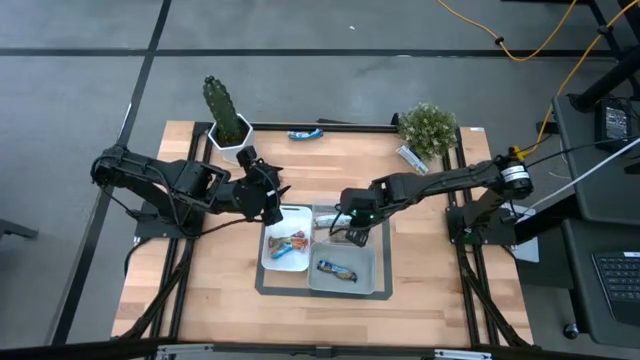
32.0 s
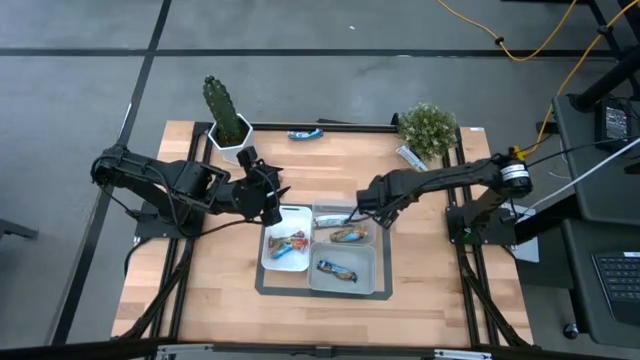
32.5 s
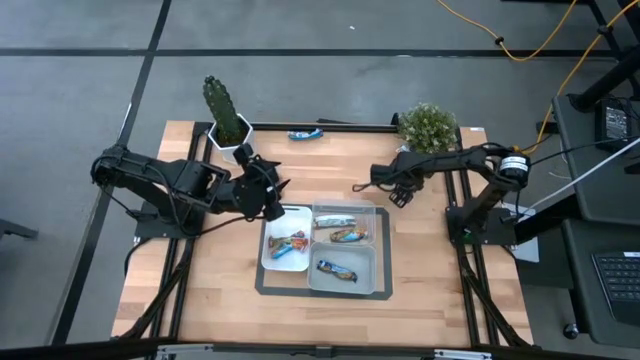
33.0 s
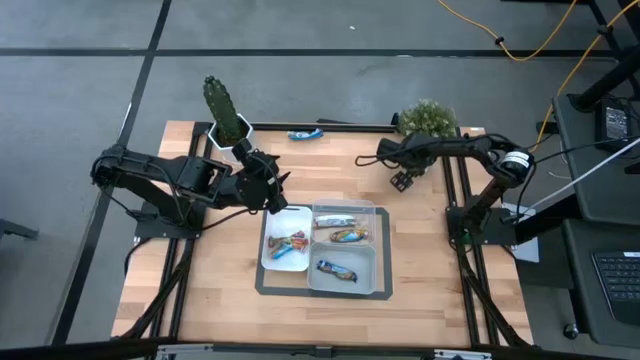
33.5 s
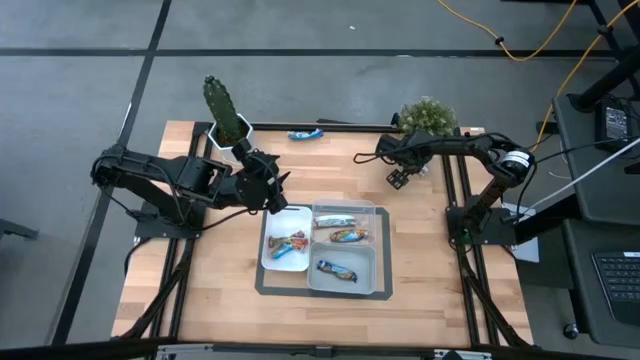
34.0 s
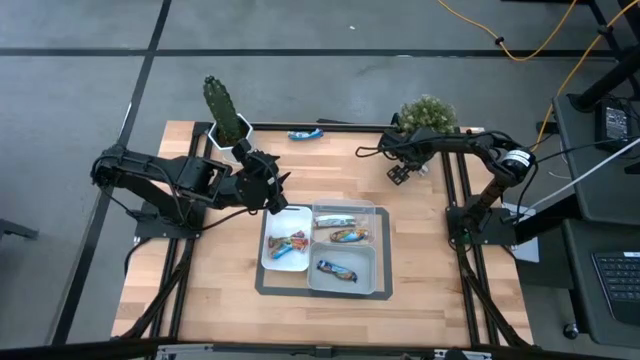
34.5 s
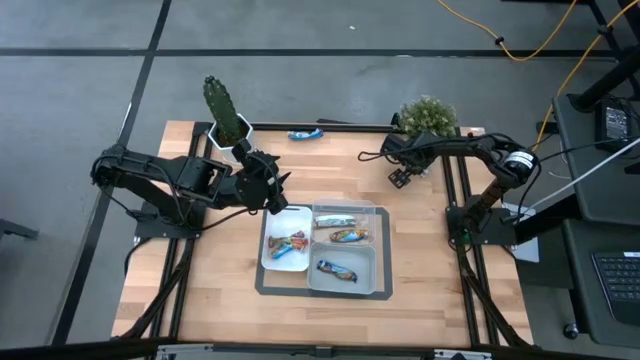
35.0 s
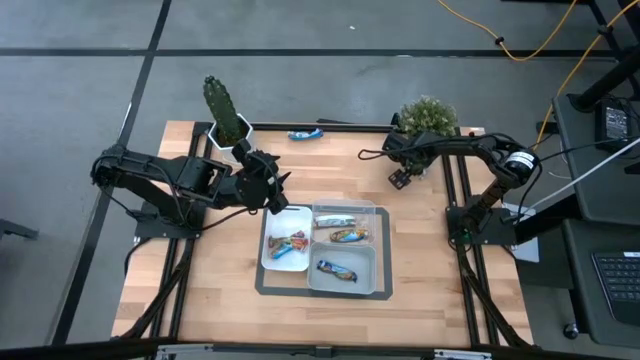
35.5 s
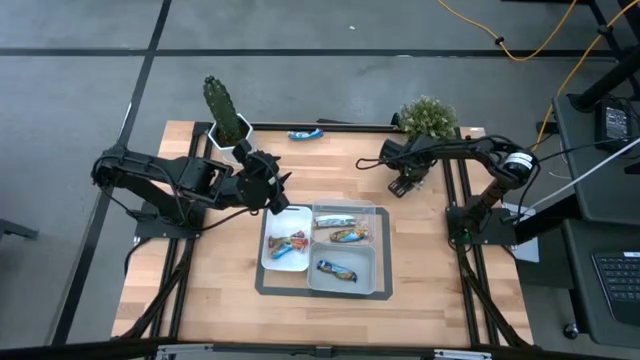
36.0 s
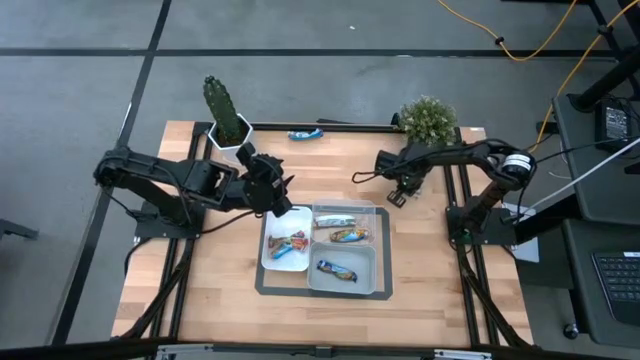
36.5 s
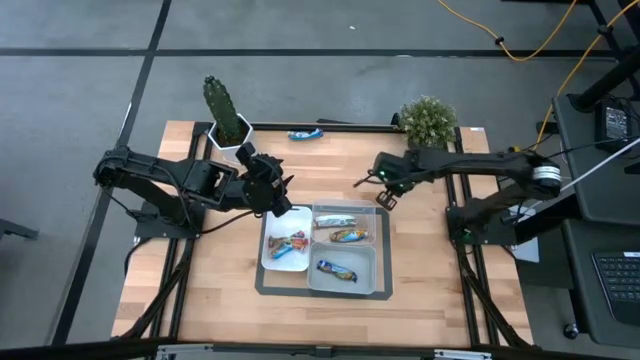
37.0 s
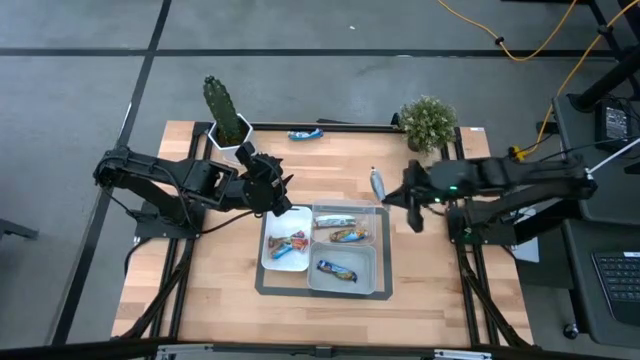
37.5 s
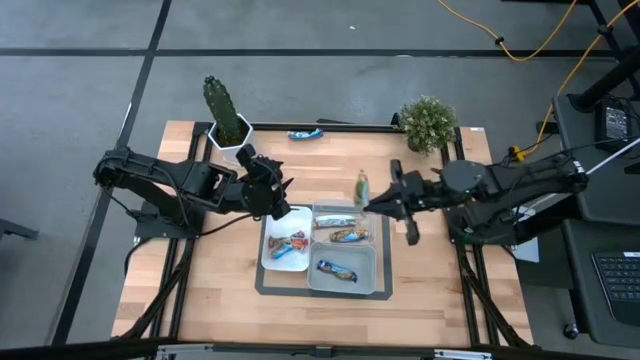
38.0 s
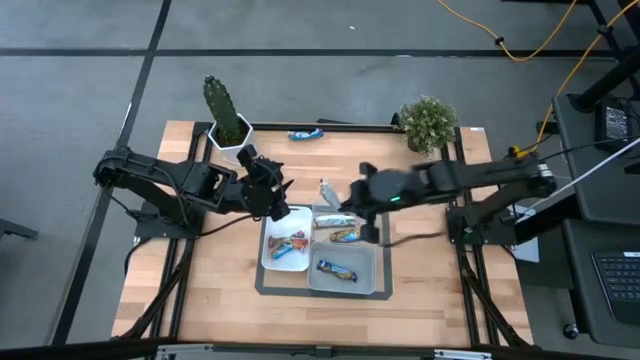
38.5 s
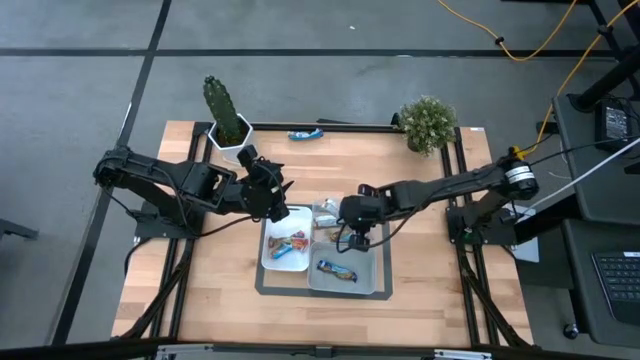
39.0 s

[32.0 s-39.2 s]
Task: Pick and place Granola Bars by type
Put the yellow granola bar into the transparent bin

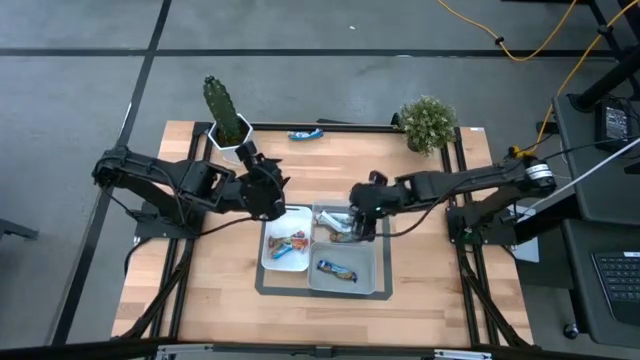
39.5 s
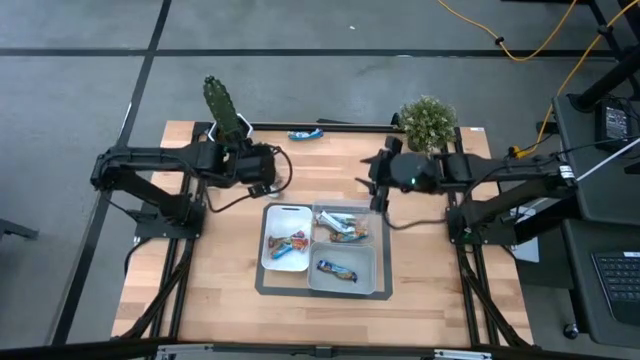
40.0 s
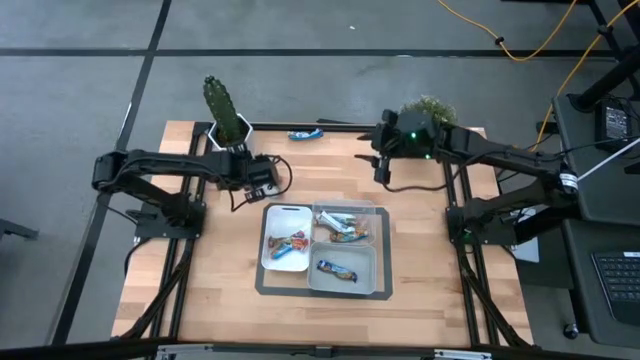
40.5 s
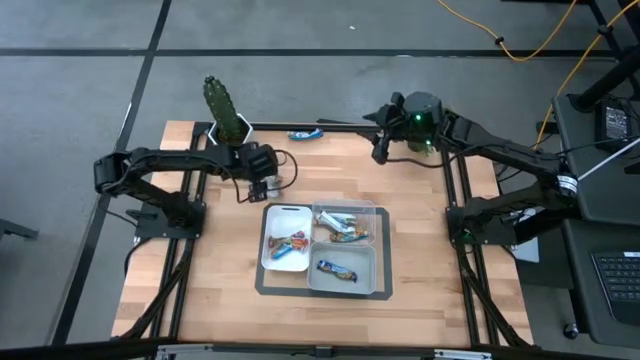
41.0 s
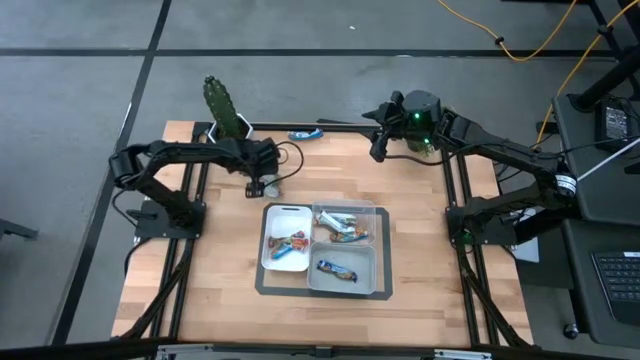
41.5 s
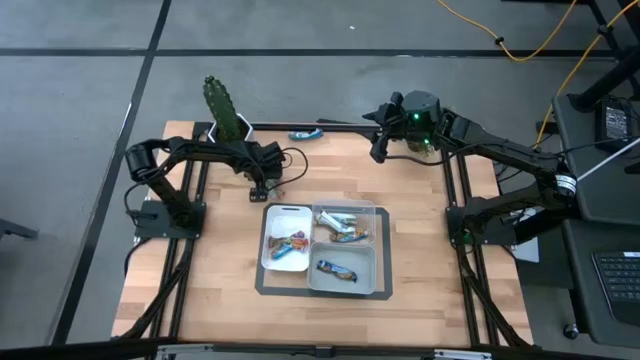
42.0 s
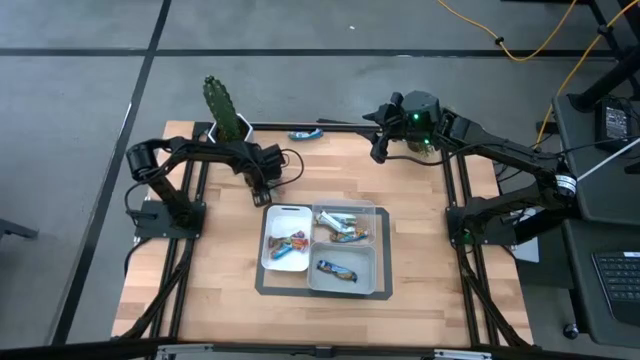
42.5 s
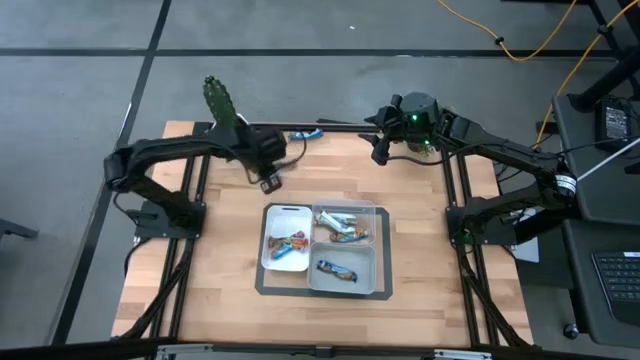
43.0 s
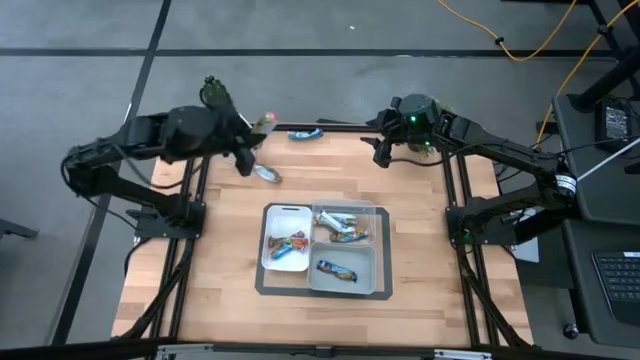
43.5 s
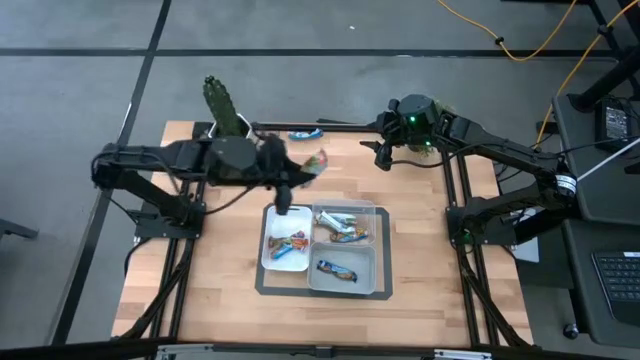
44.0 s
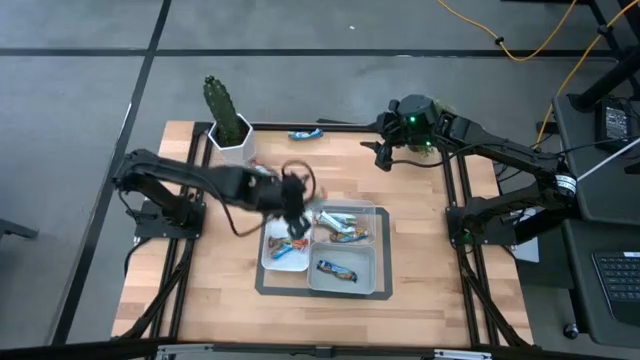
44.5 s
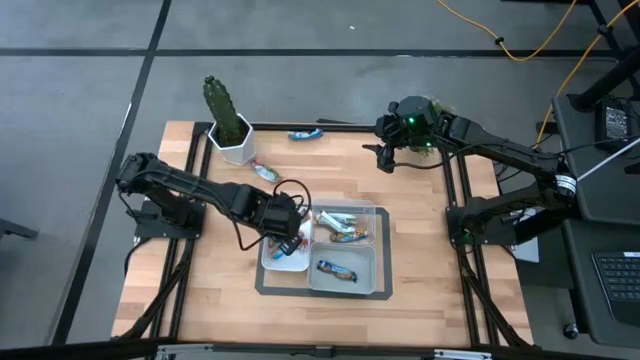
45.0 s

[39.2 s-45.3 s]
Put the red granola bar into the white bin

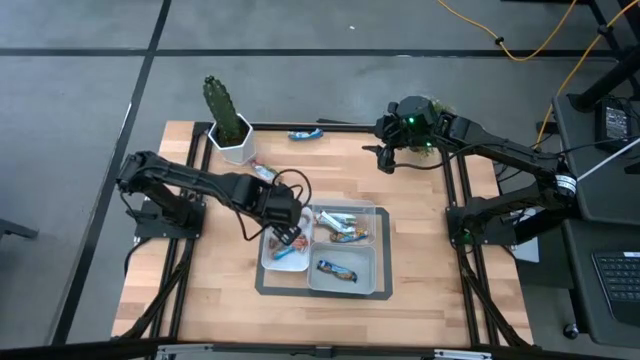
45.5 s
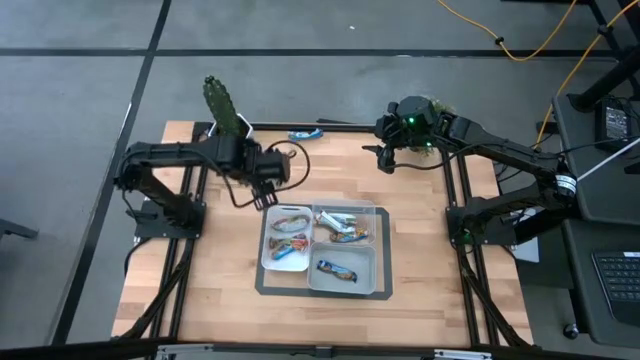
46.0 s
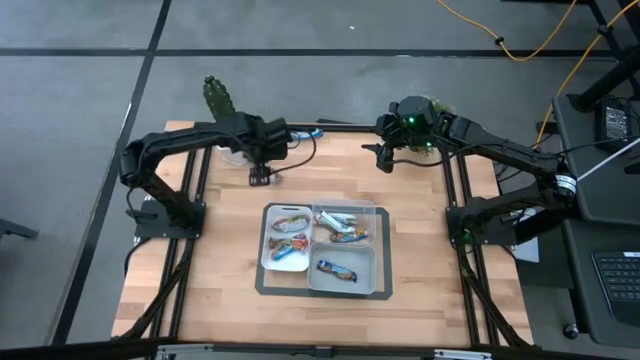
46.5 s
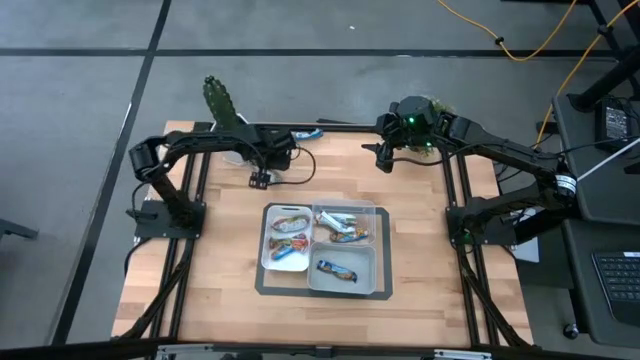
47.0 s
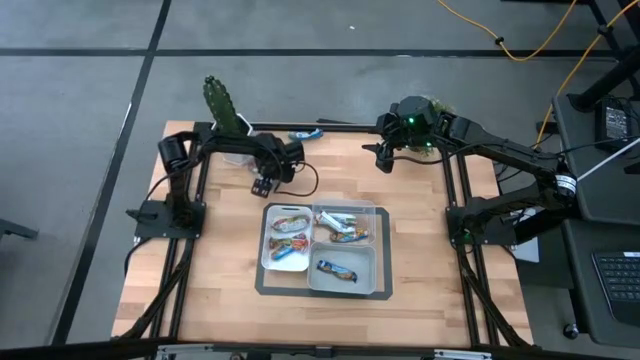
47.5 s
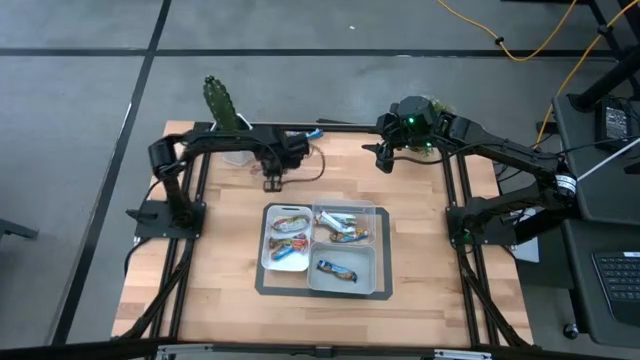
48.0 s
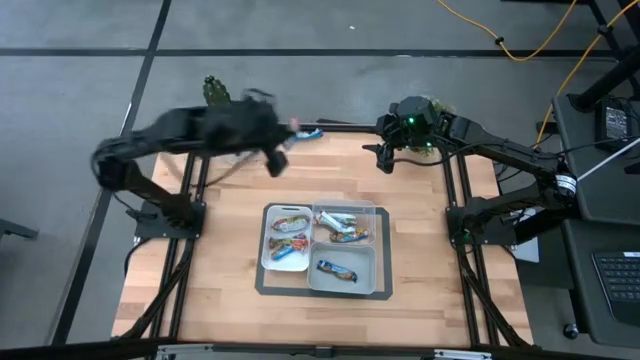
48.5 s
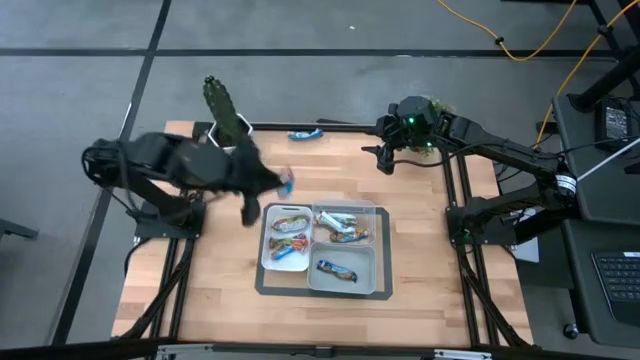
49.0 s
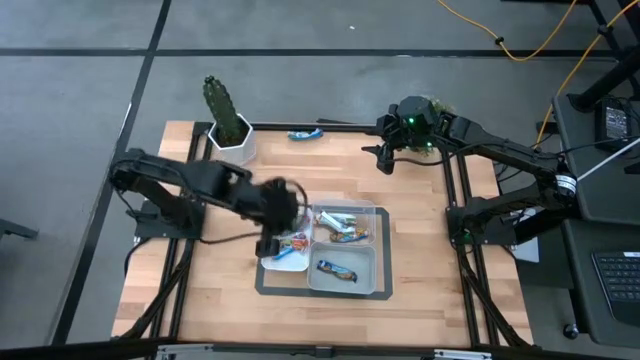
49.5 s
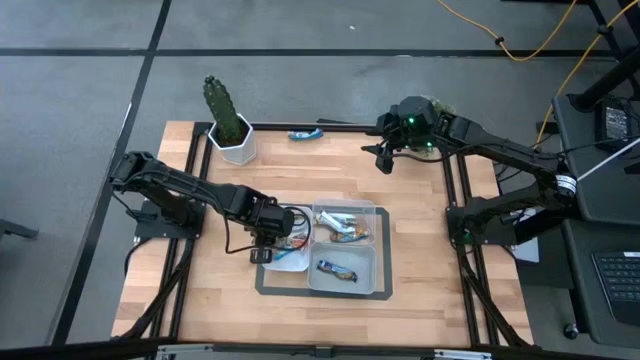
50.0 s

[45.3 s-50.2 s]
Put the red granola bar into the white bin

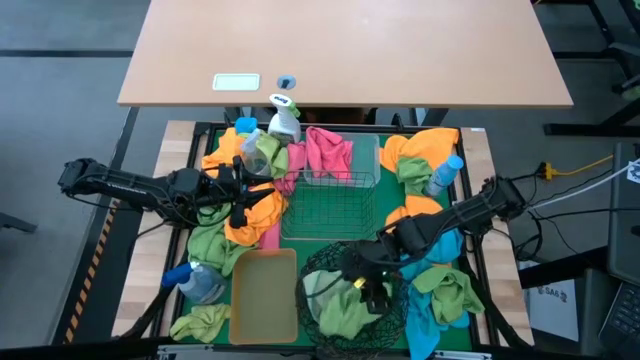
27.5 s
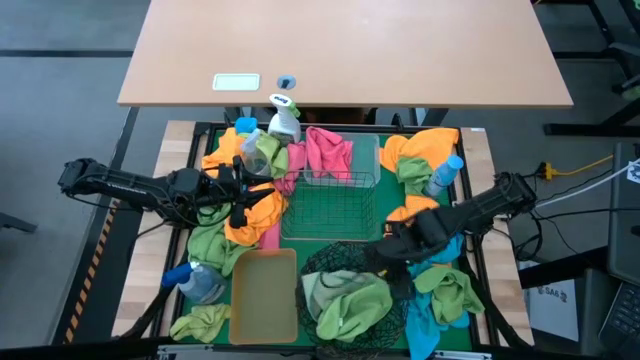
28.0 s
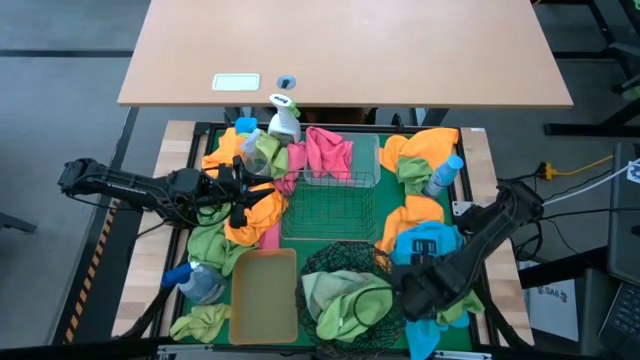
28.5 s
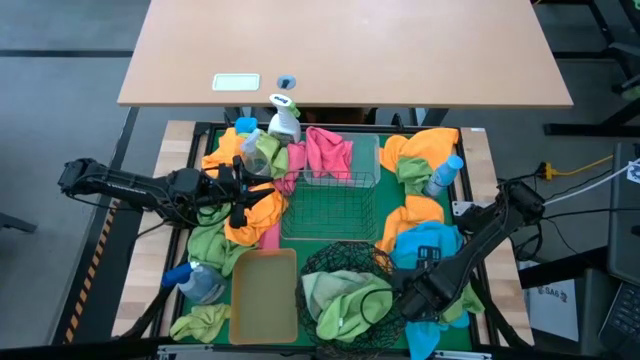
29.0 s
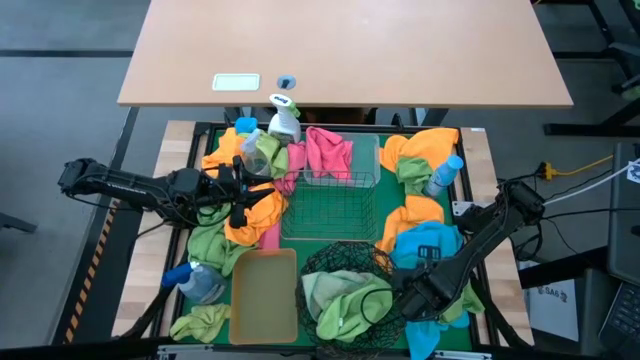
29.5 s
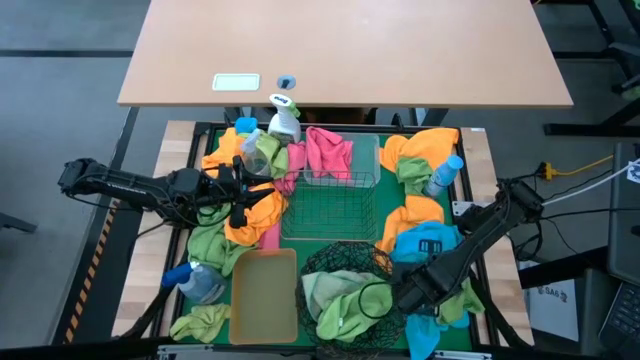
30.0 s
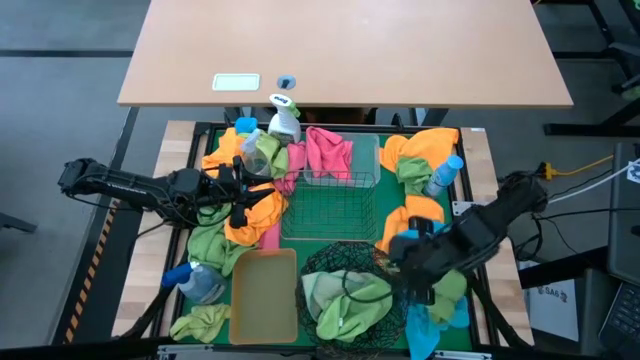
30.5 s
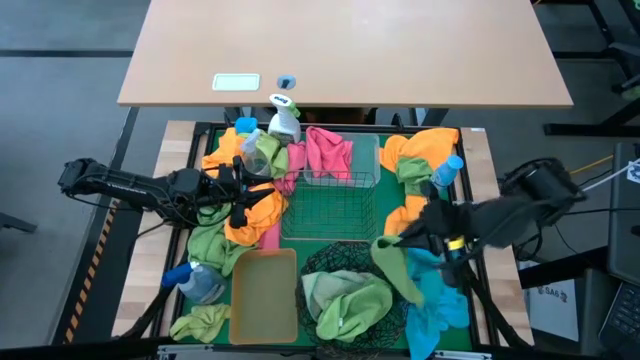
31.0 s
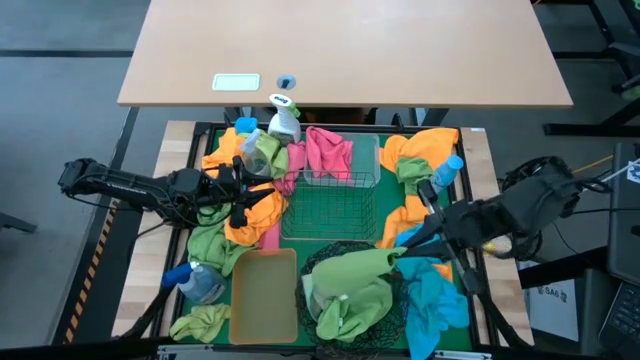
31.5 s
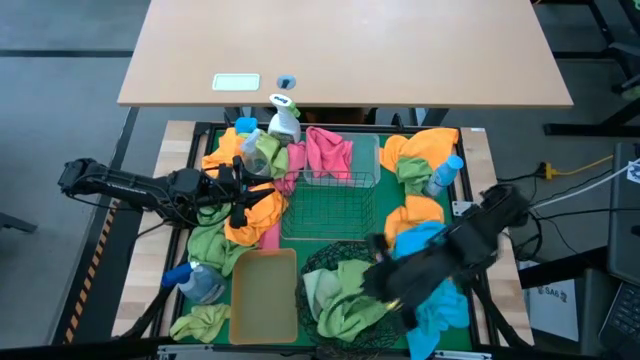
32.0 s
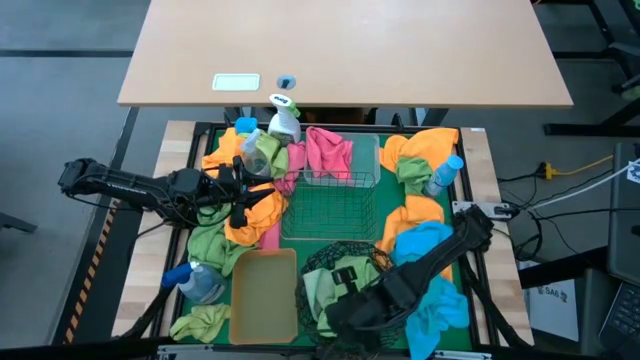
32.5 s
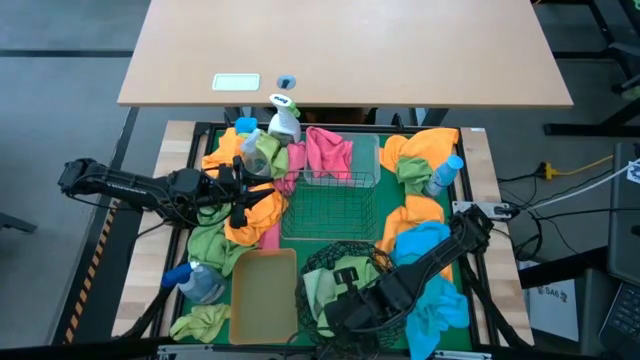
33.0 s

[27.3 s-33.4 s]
Task: Sort microfiber towel by color & place in baskets
Put the green microfiber towel into the black wire basket
